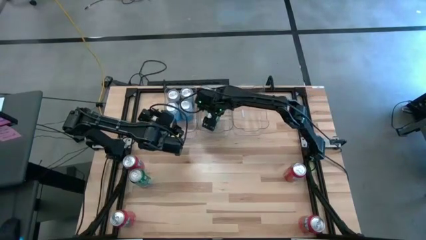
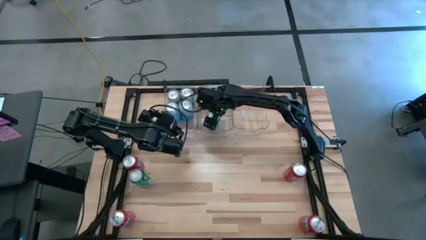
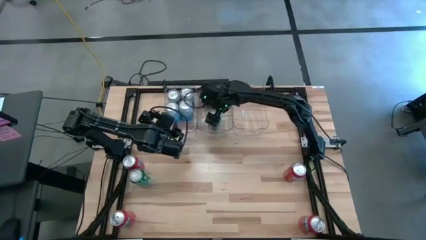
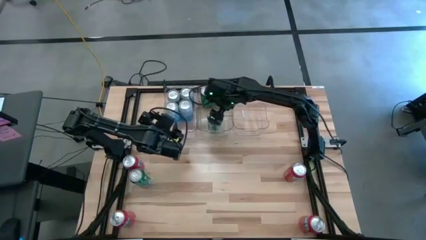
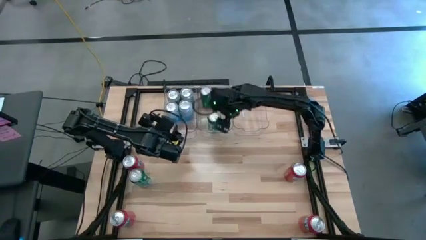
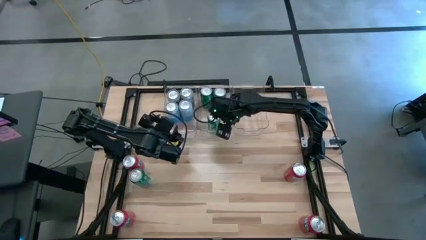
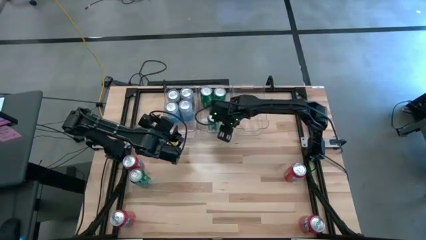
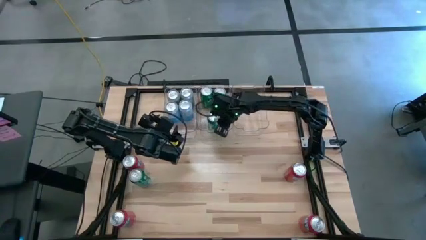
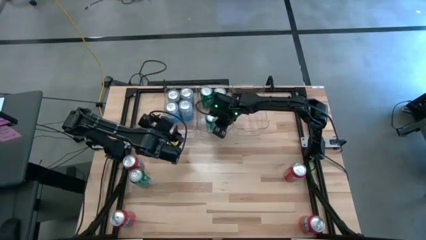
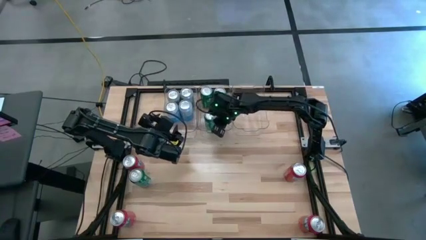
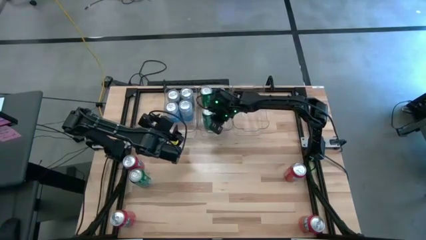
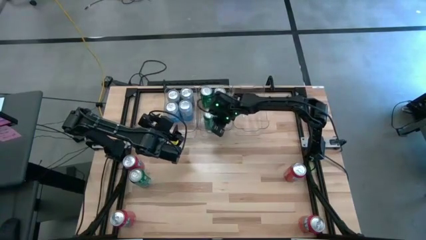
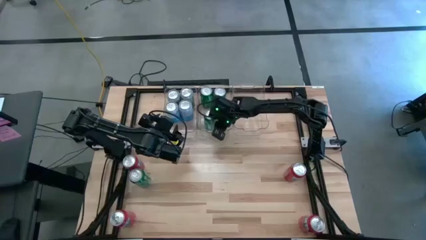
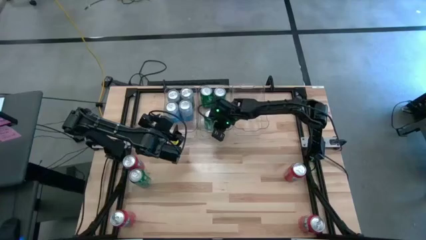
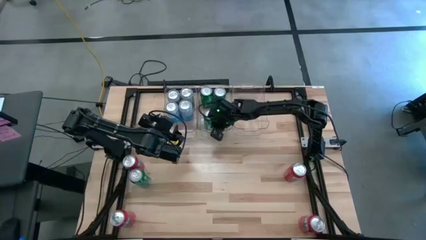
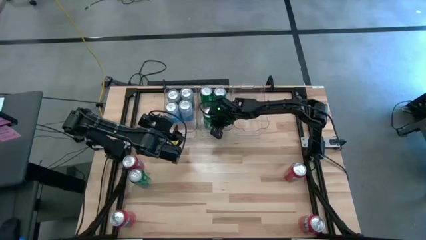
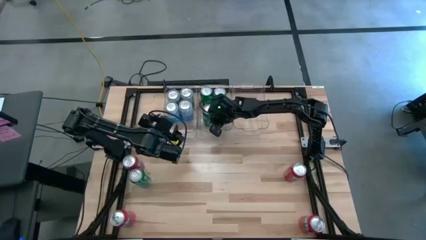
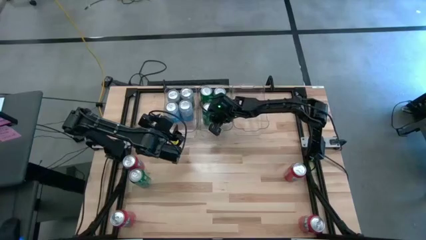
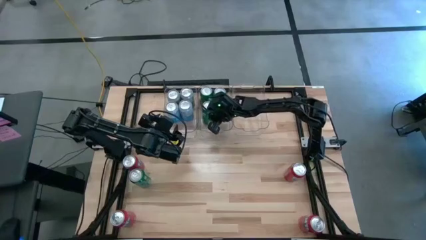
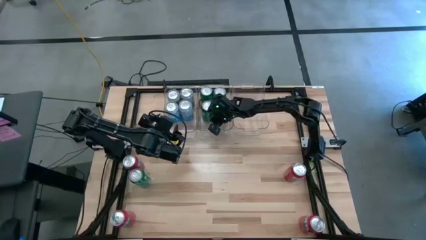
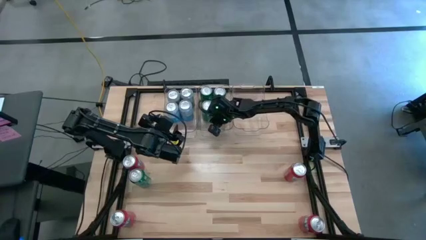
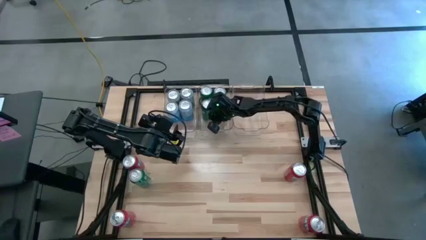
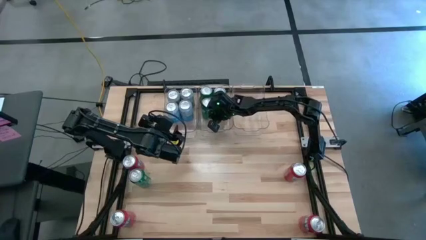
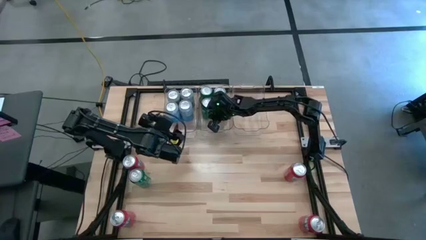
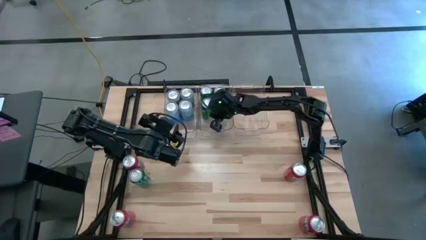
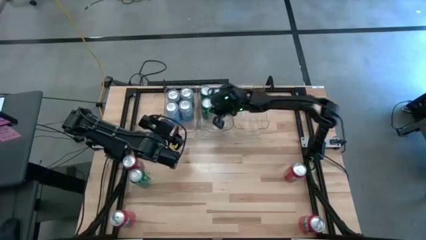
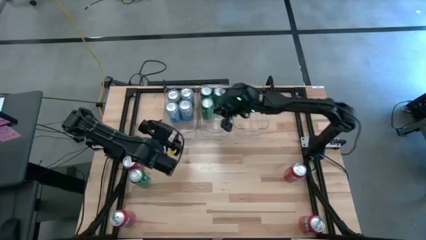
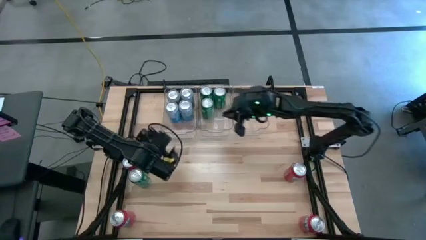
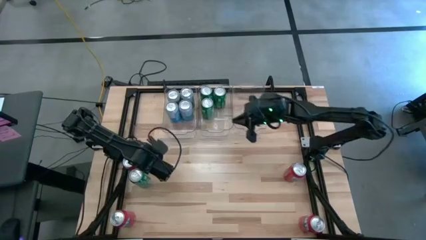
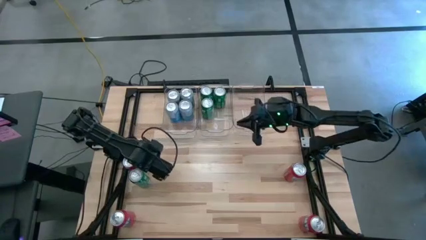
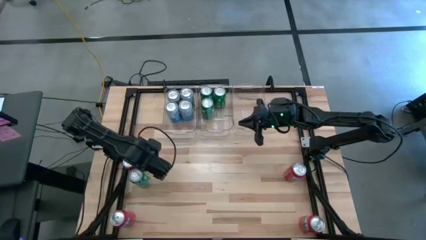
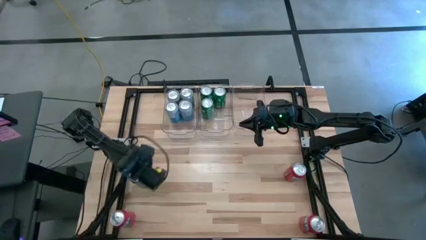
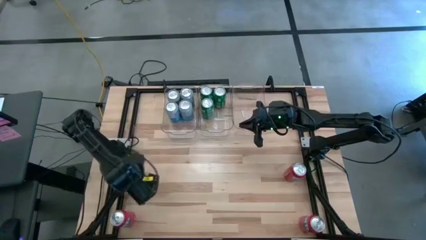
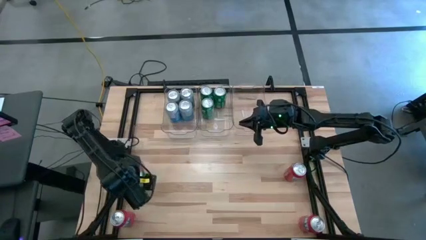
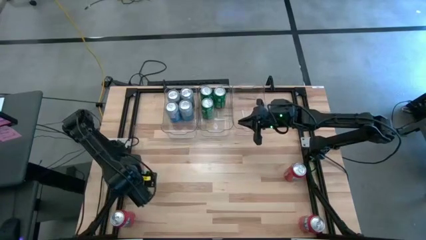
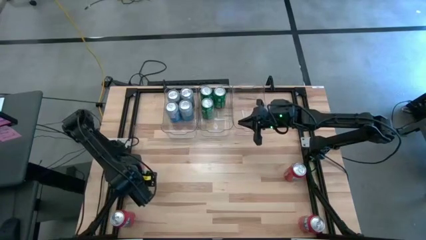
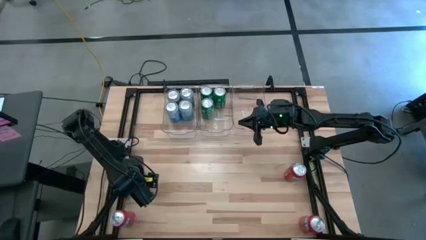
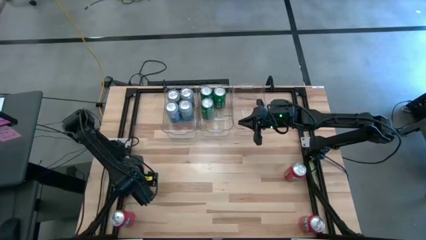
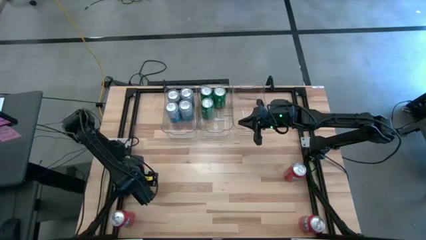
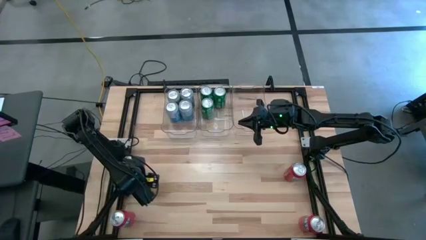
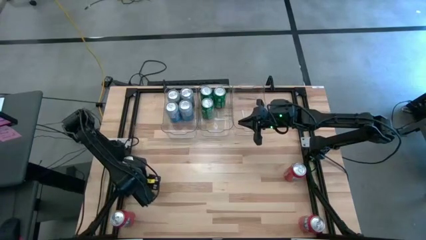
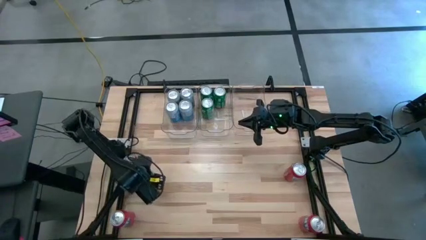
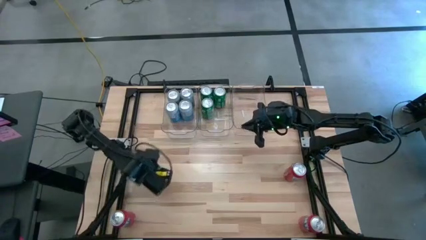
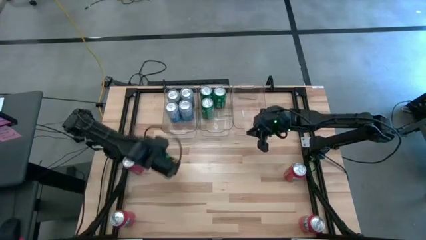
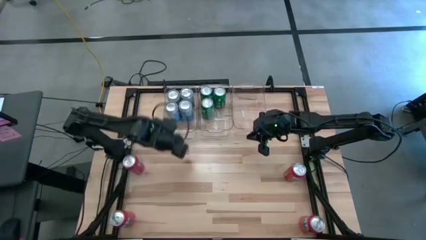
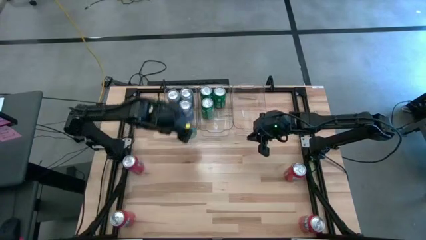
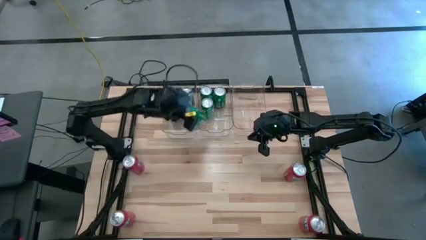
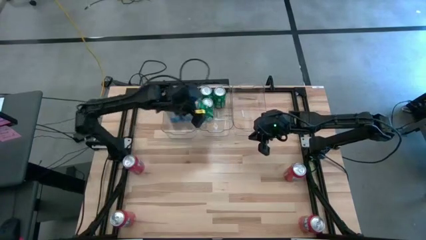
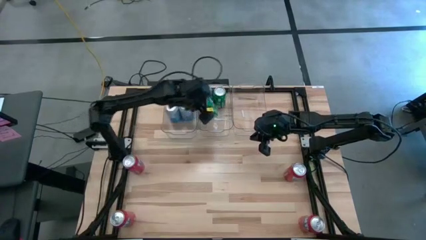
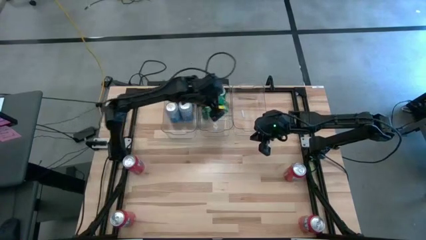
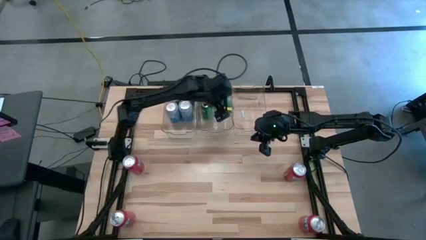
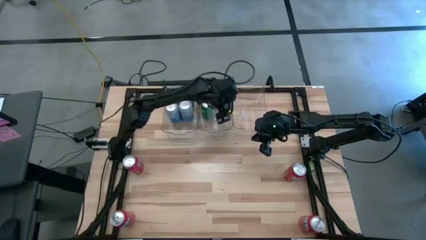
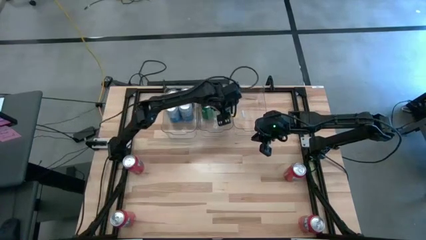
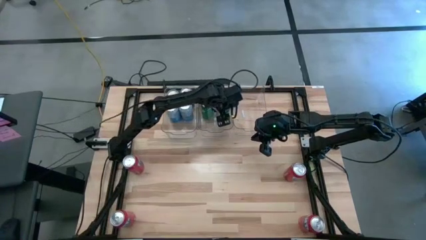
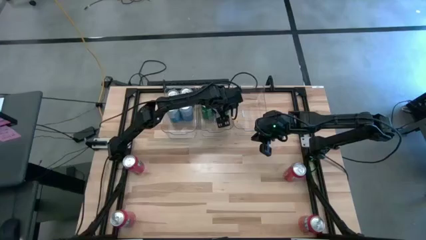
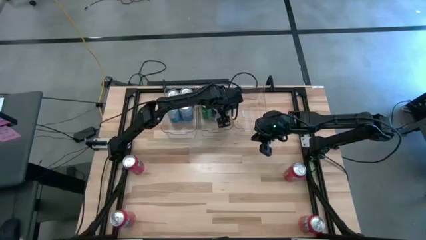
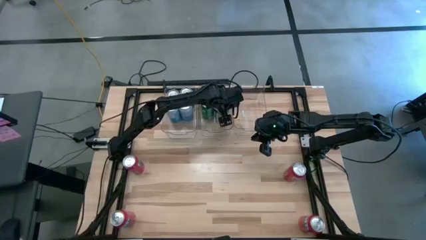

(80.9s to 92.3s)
Task: Sort soda cans
Put the green soda can into the middle transparent bin

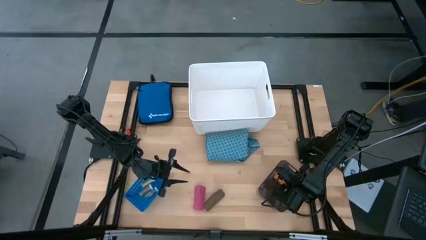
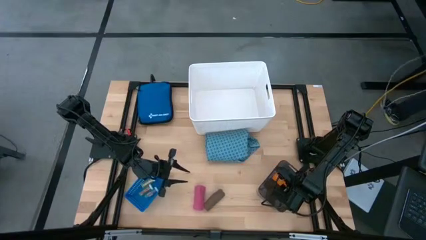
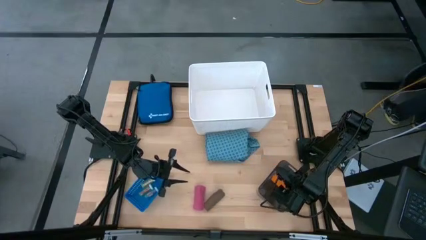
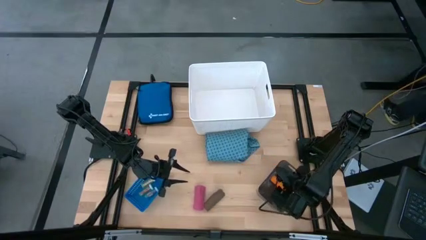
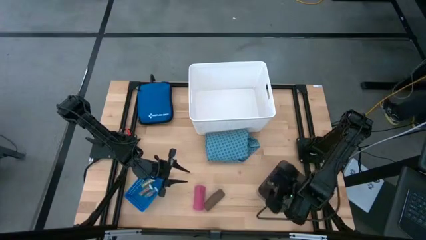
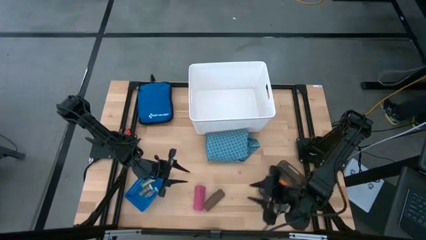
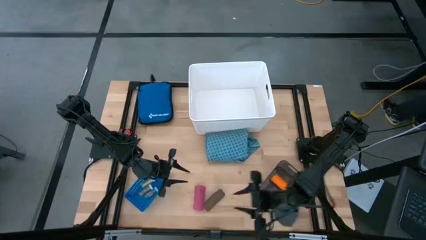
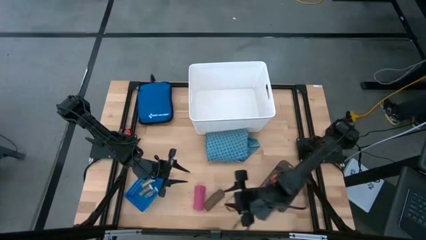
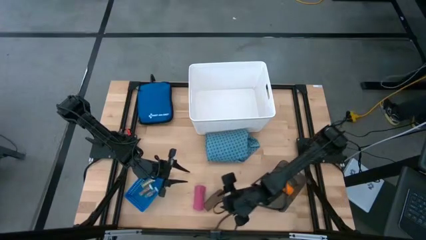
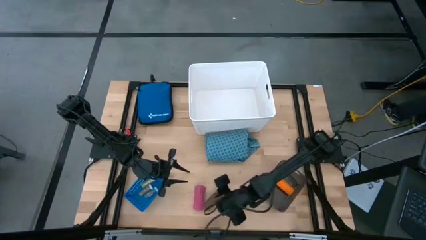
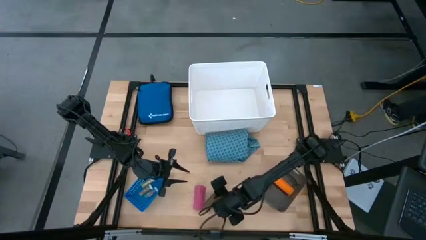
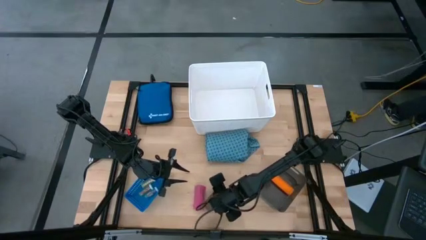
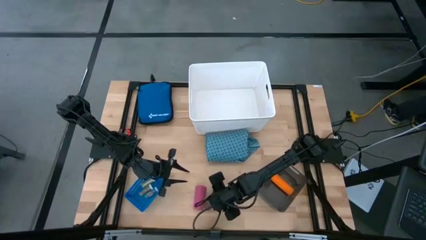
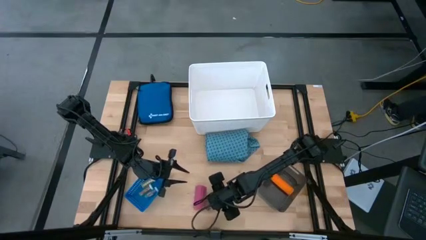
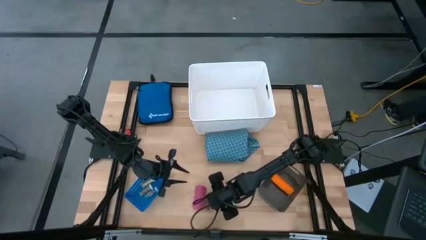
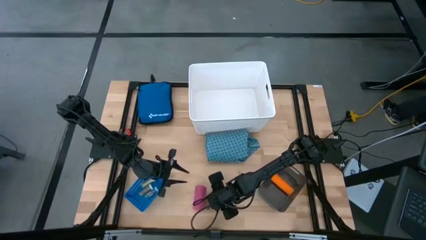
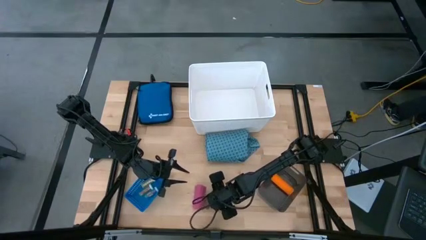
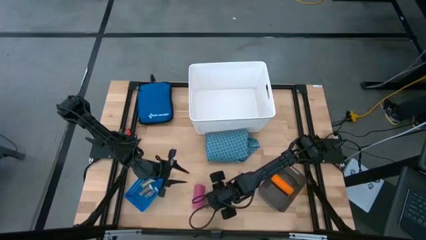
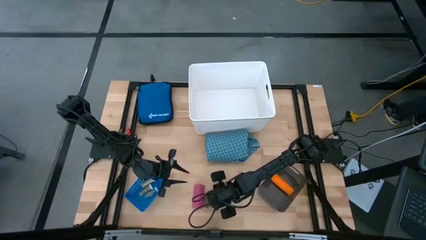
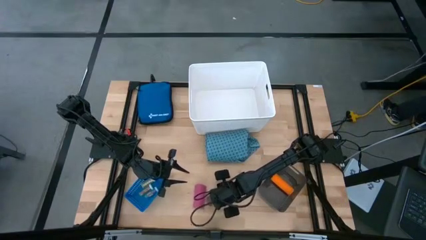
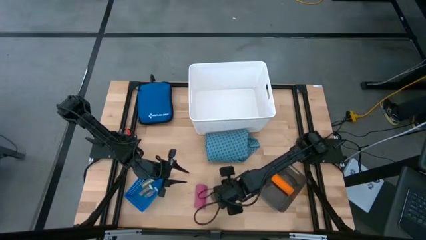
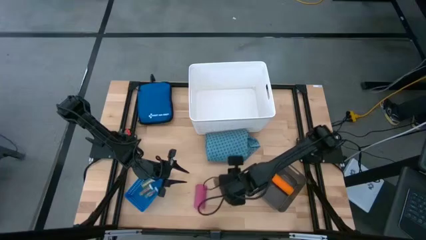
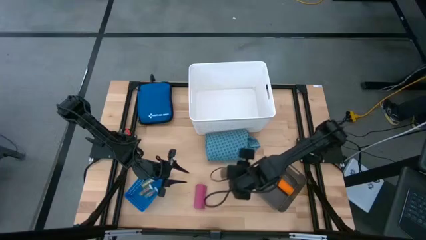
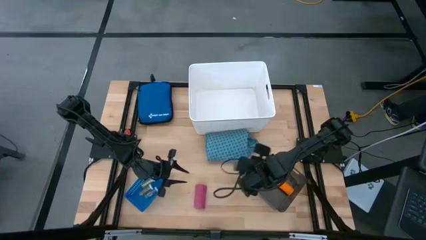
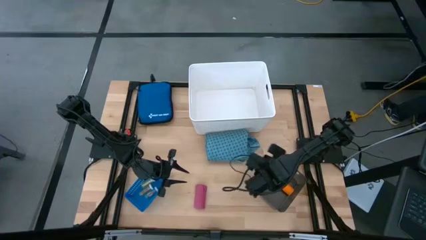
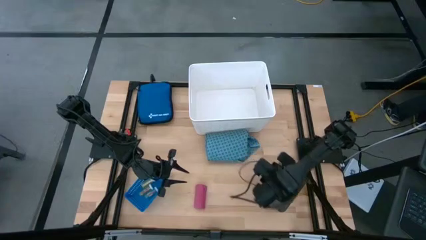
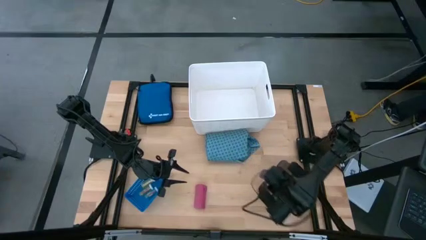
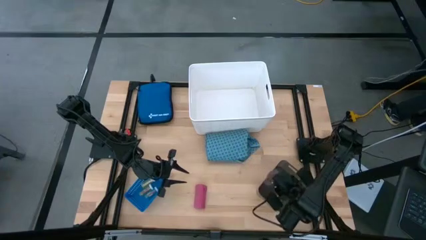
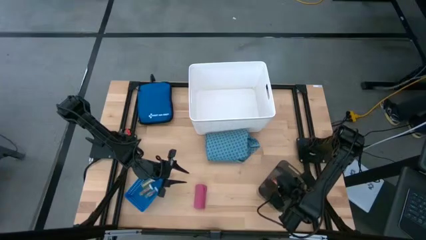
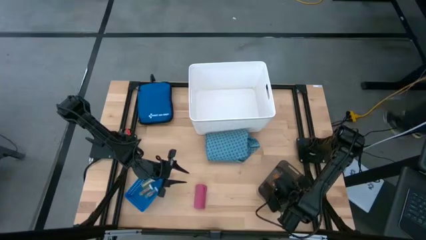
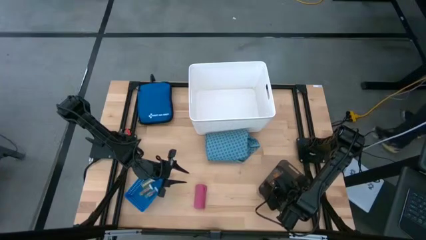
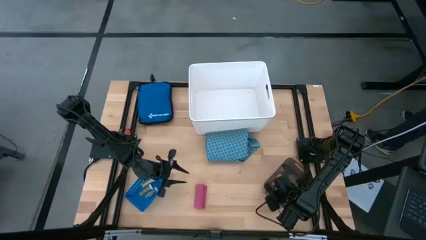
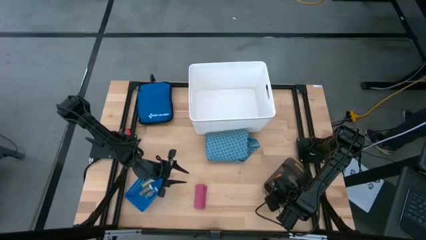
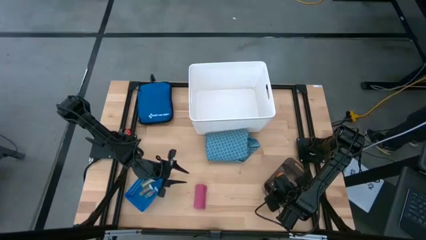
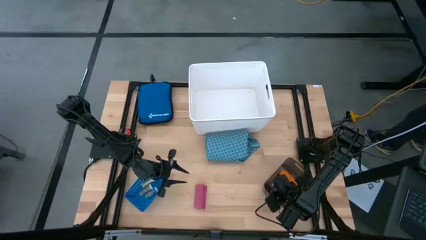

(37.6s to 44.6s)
Task: Pick & Place Medicine items
Put the brown bandage into the black bin
